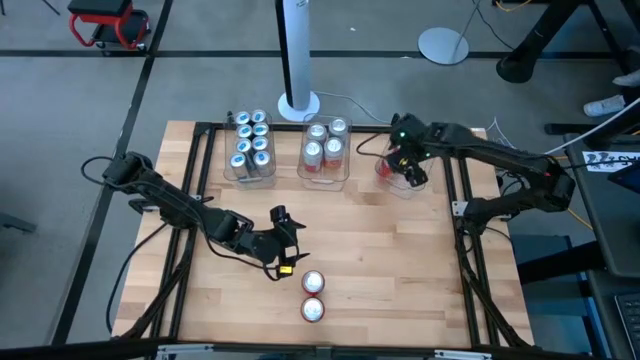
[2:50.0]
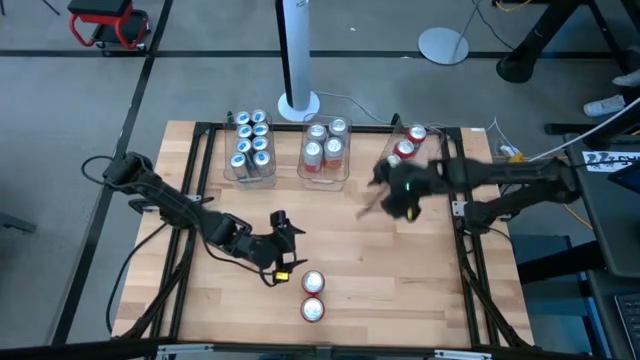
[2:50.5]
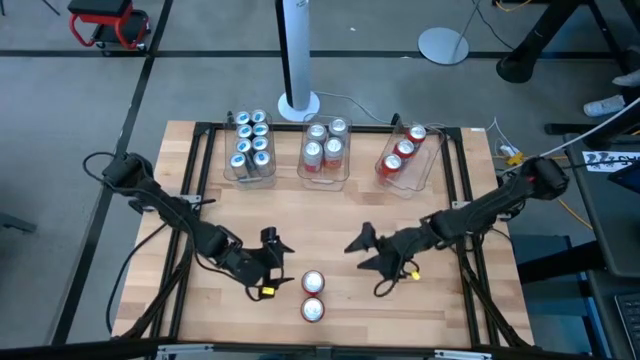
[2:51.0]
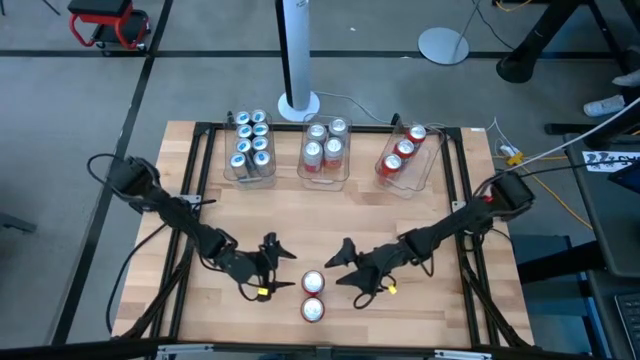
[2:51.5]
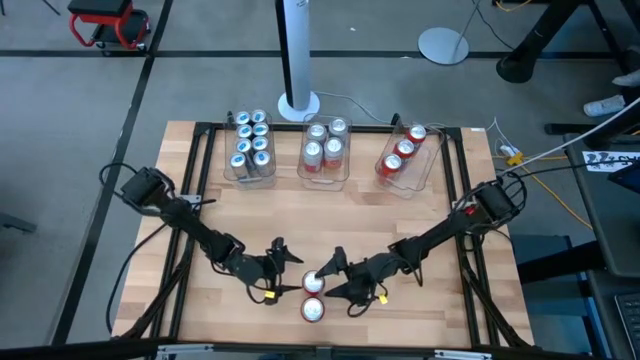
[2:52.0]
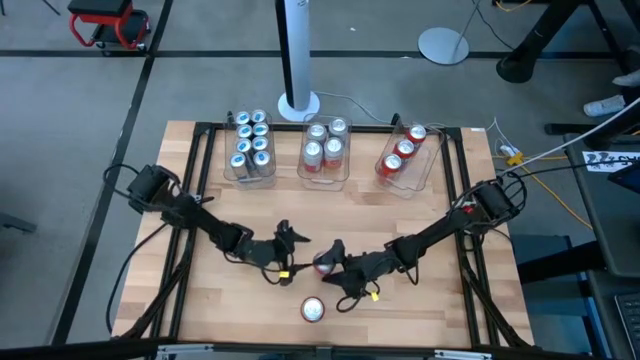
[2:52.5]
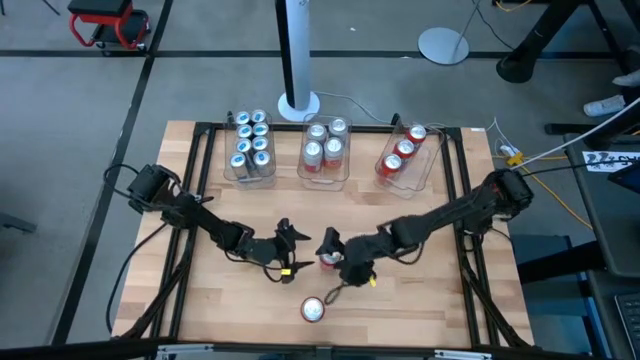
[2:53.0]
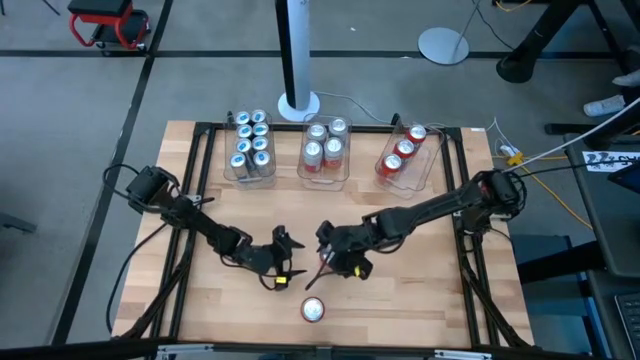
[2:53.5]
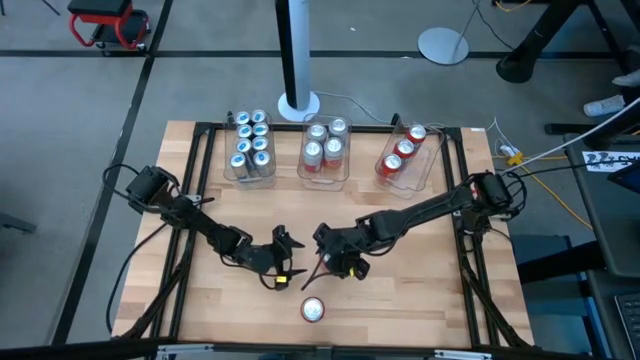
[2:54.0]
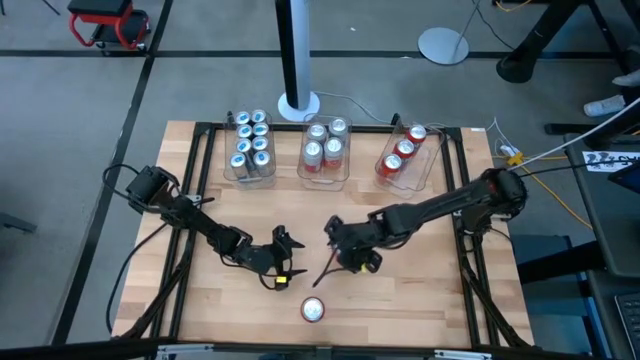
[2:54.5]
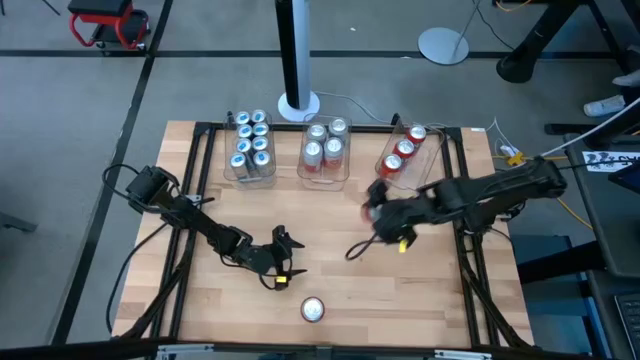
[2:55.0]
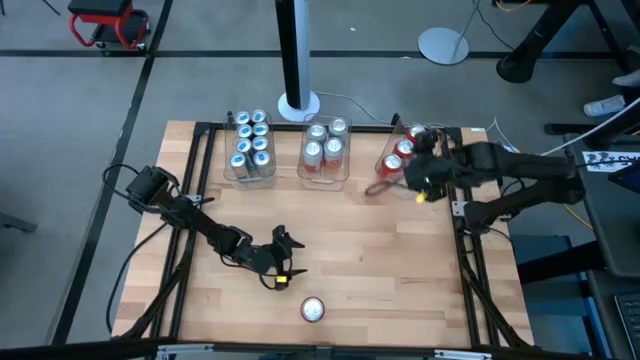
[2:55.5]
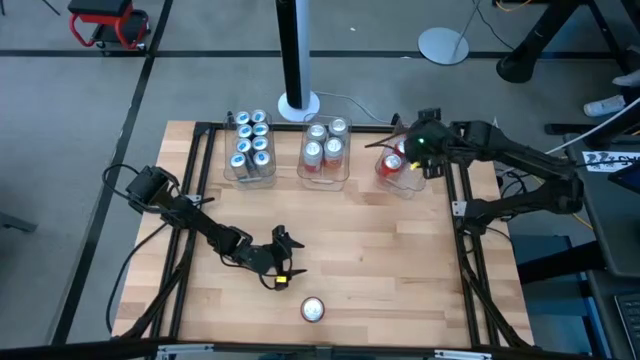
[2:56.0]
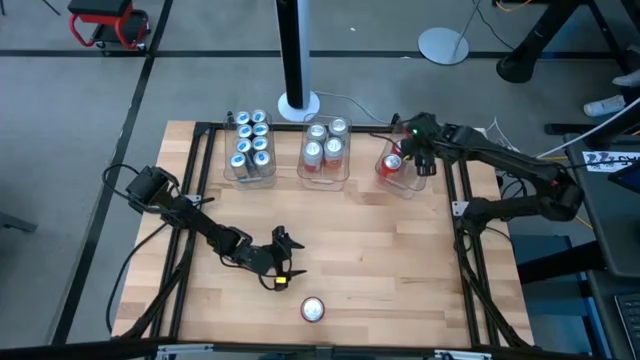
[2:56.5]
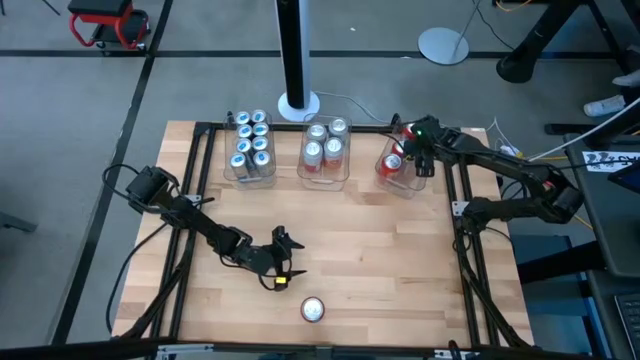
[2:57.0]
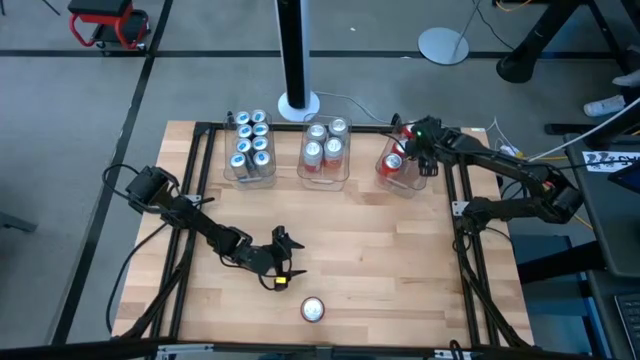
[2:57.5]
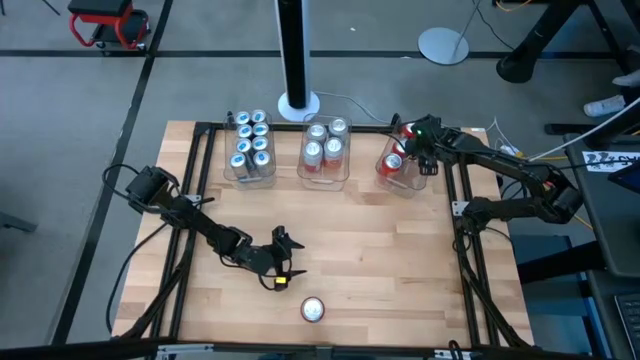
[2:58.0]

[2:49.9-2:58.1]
Task: Sort soda cans
Put the red soda can into the right transparent bin

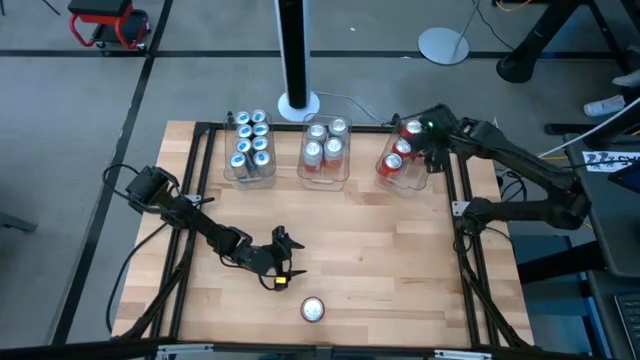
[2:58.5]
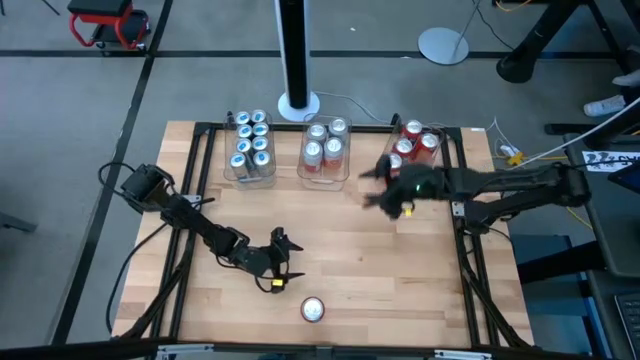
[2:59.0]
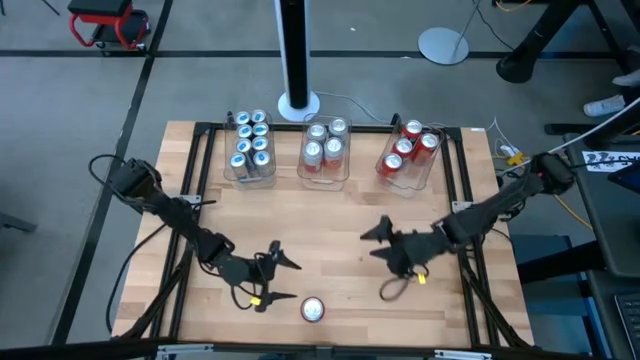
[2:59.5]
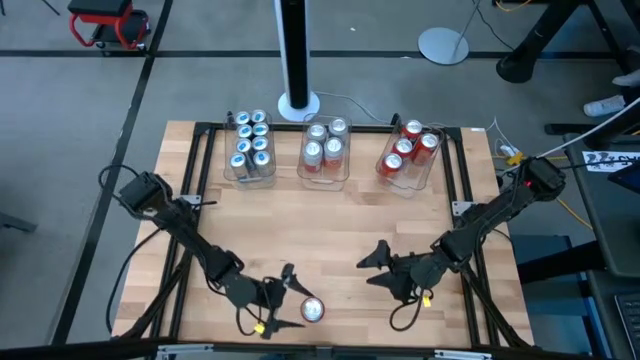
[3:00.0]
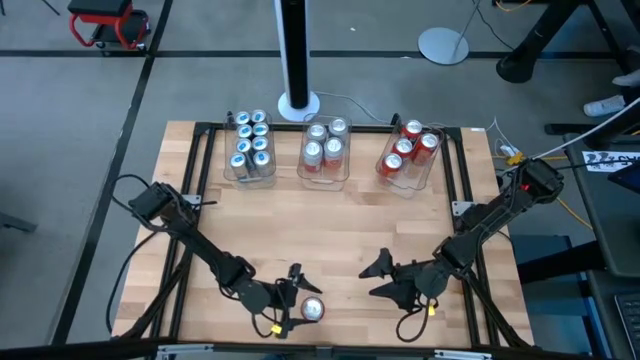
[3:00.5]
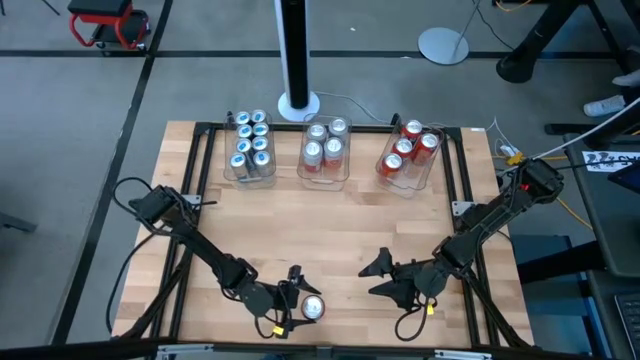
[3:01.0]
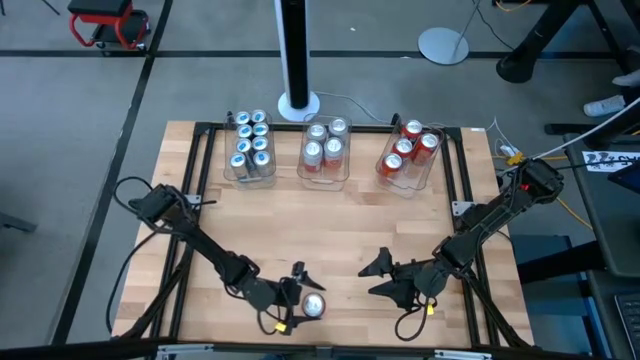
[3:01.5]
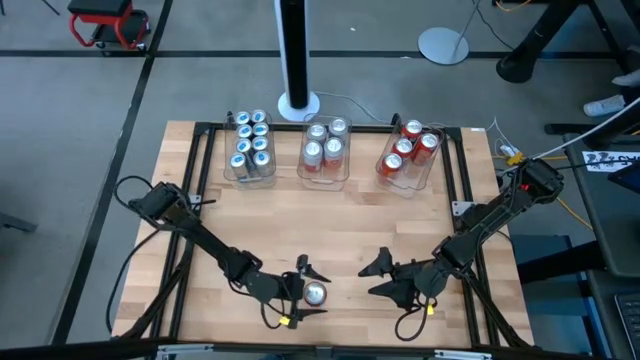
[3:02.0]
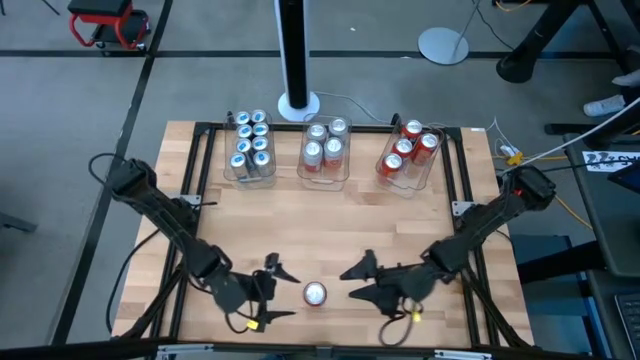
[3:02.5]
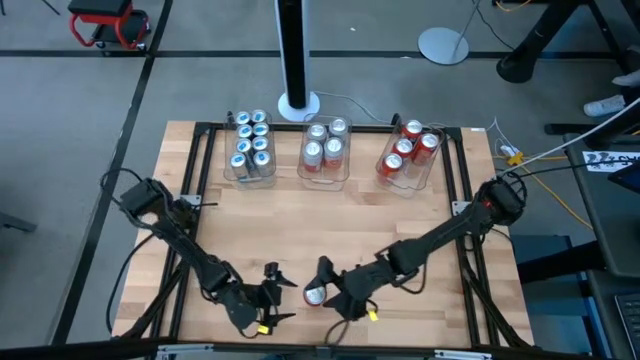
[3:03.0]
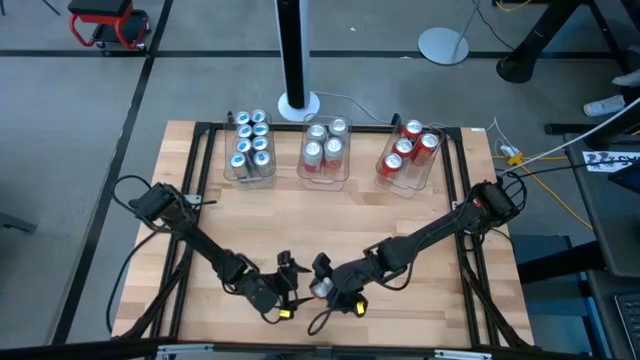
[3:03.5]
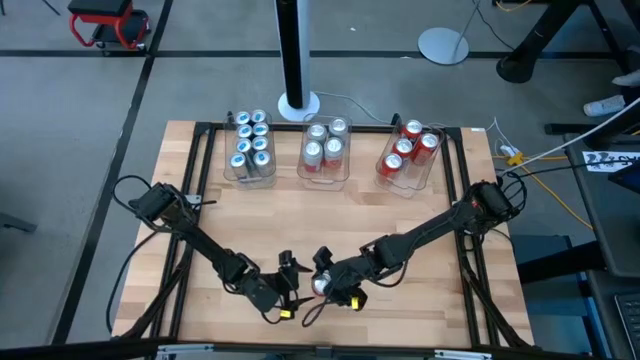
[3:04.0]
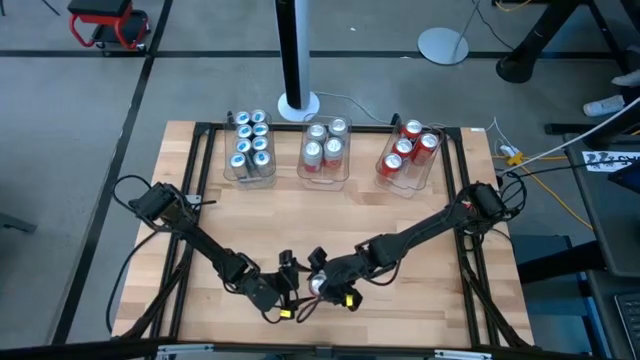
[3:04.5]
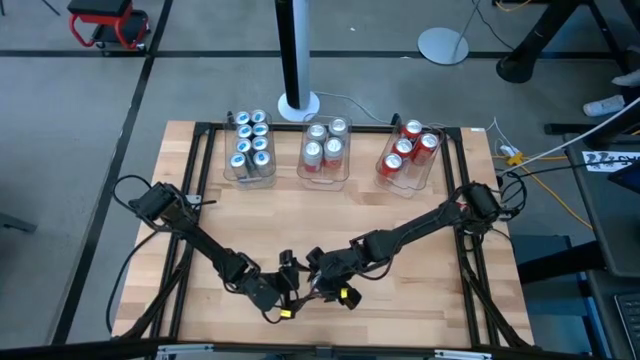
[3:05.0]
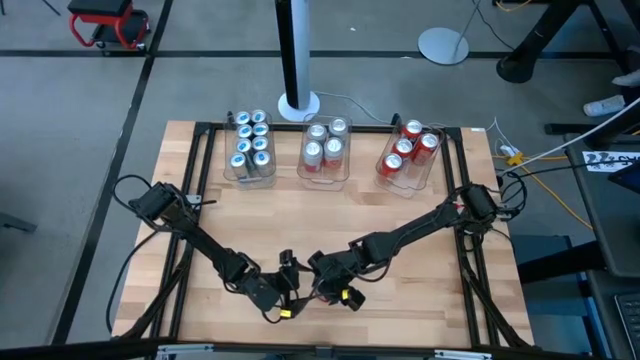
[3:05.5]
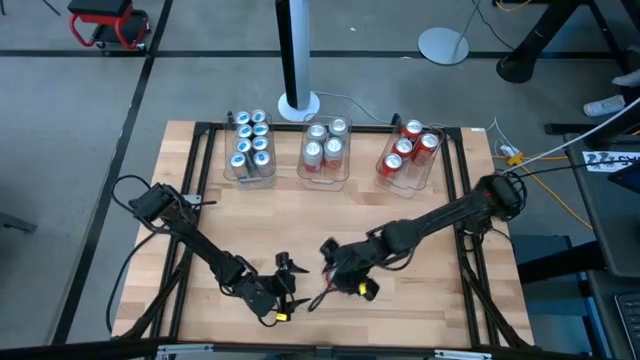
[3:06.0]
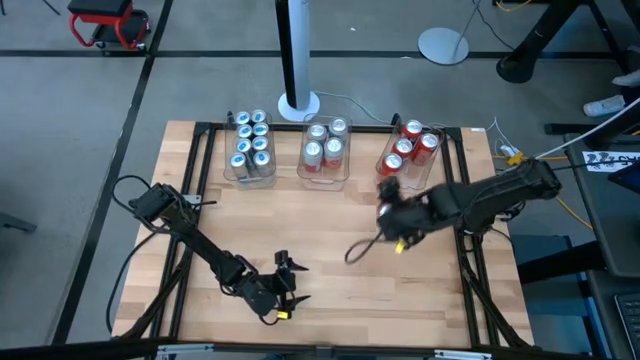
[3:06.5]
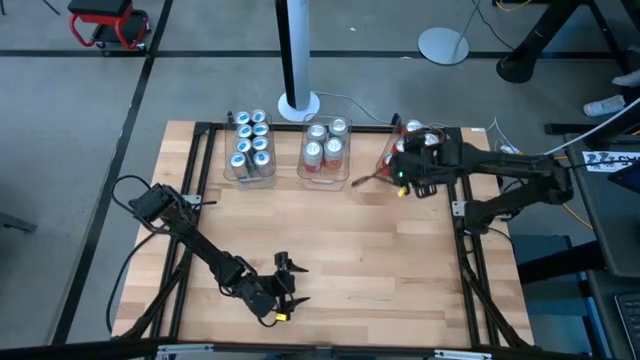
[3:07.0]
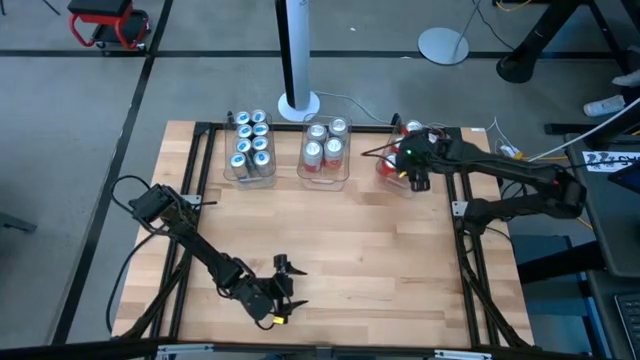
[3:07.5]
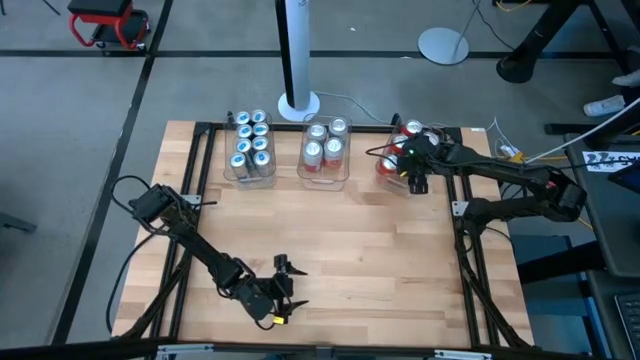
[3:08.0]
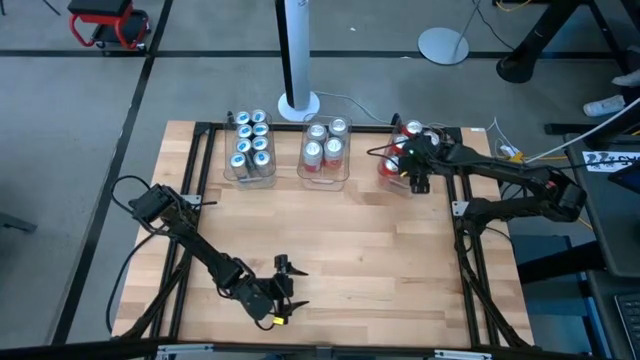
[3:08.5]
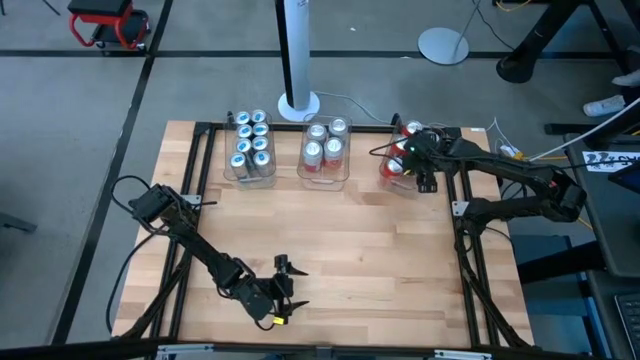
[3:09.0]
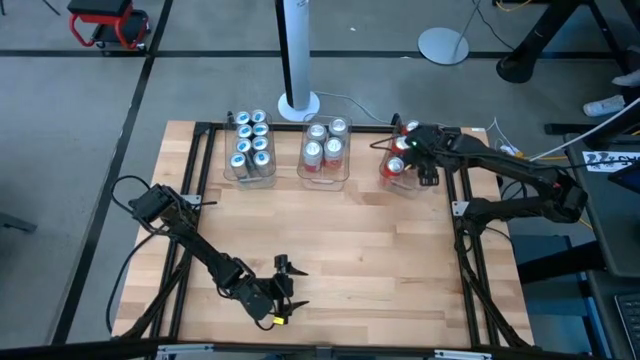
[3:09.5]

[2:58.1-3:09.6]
Put the red soda can into the right transparent bin

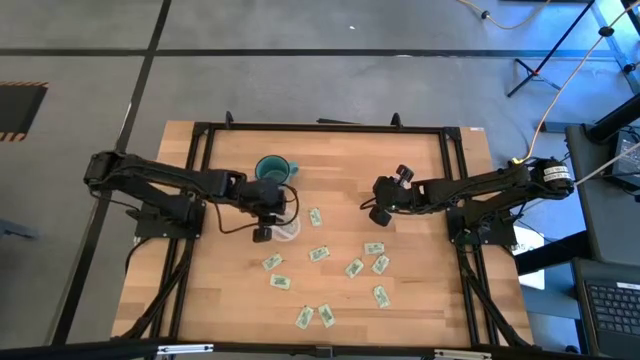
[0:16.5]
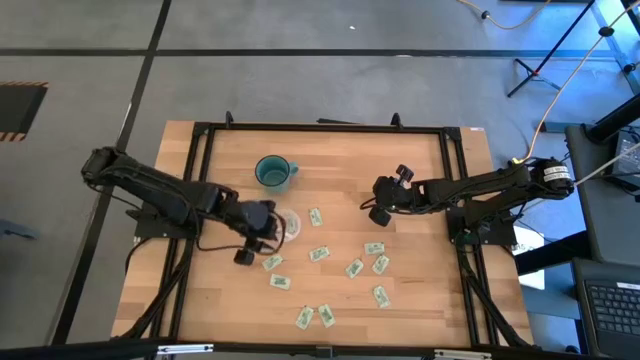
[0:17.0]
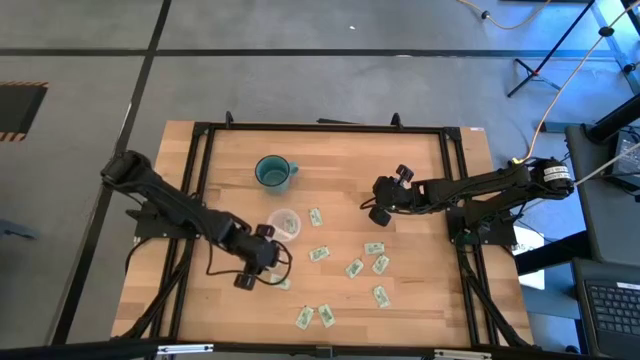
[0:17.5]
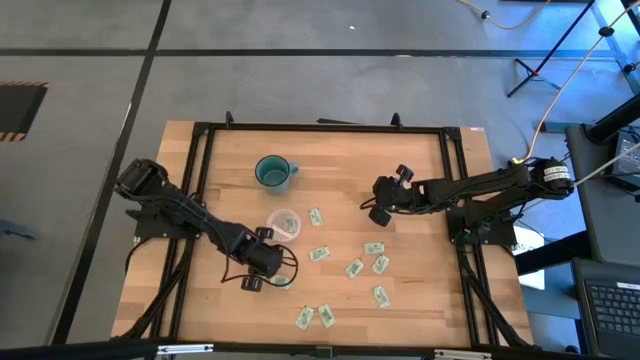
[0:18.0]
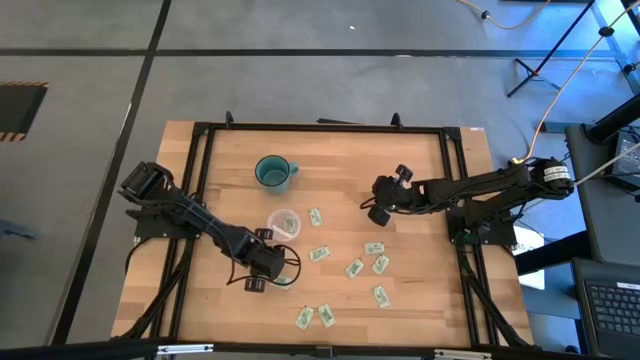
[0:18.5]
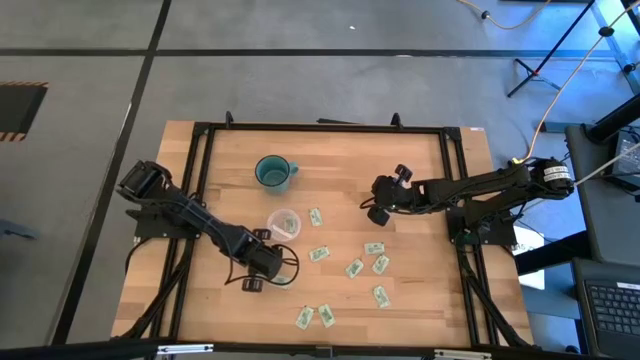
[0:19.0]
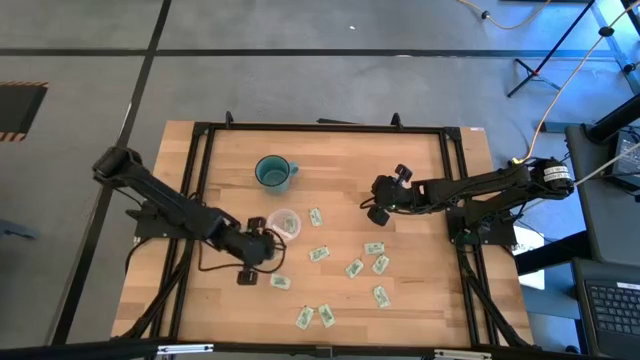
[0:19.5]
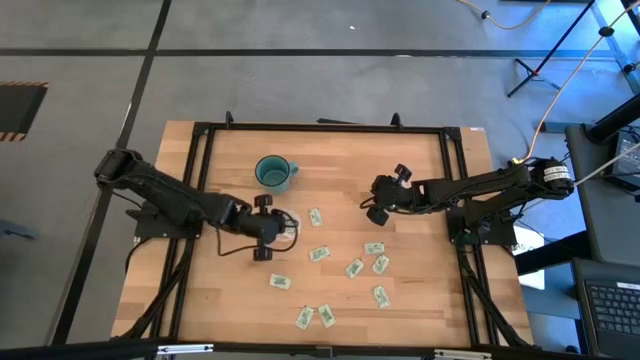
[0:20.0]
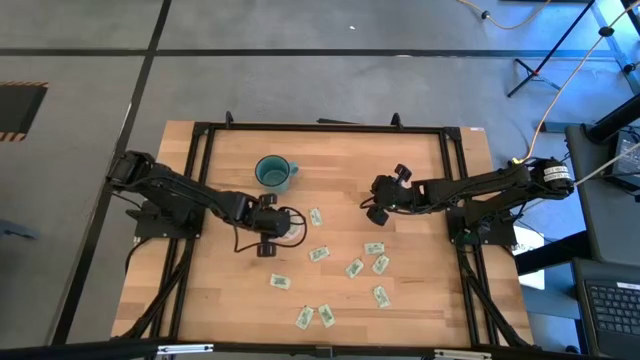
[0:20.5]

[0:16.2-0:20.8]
Task: Pick and place Stevia / Truvia into bins
Put the white stevia packet into the left transparent container
